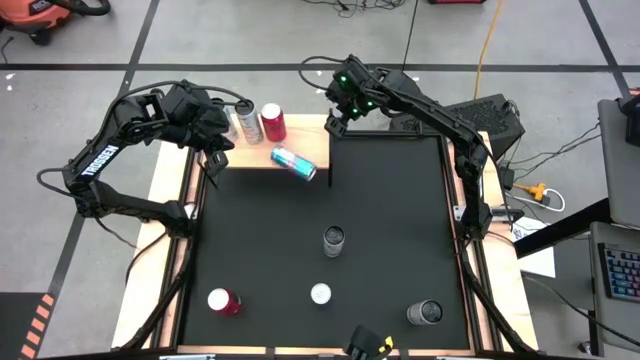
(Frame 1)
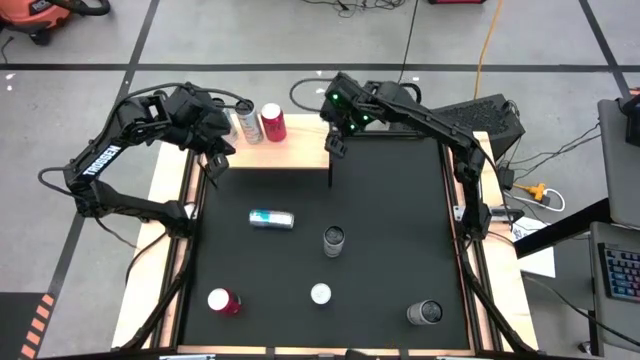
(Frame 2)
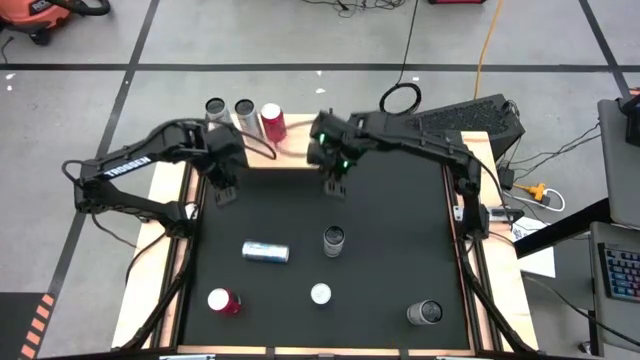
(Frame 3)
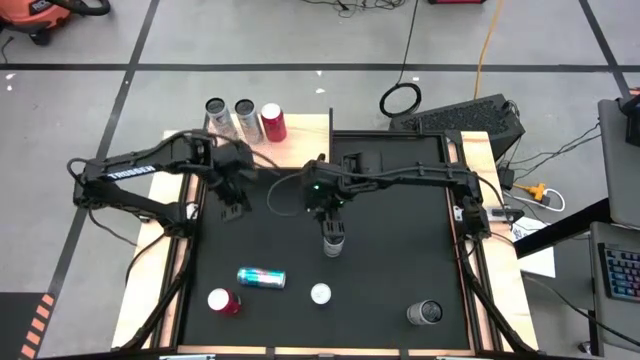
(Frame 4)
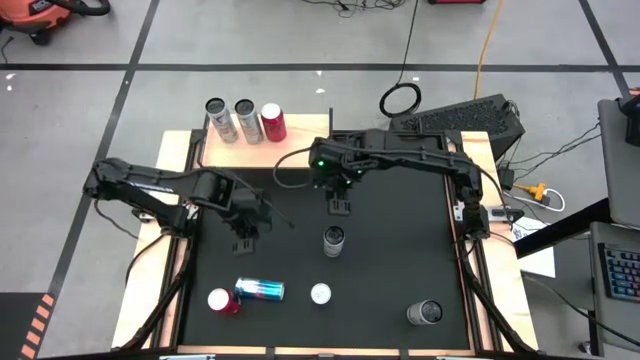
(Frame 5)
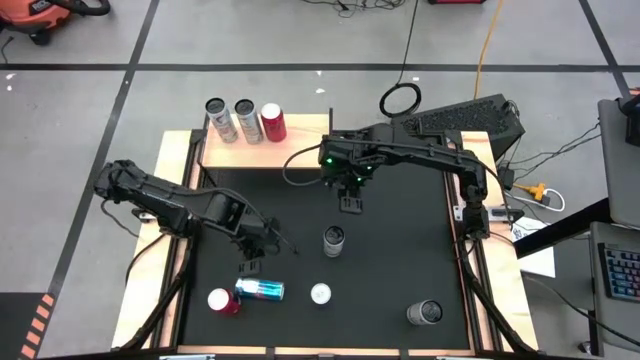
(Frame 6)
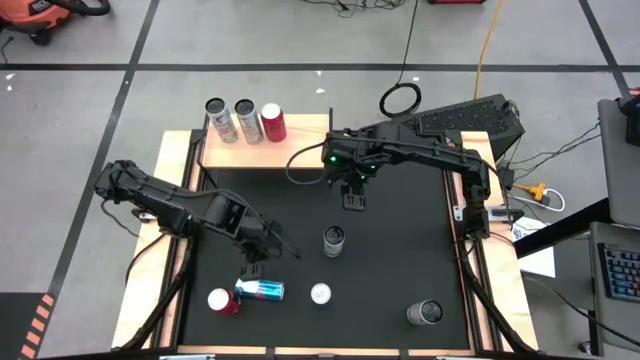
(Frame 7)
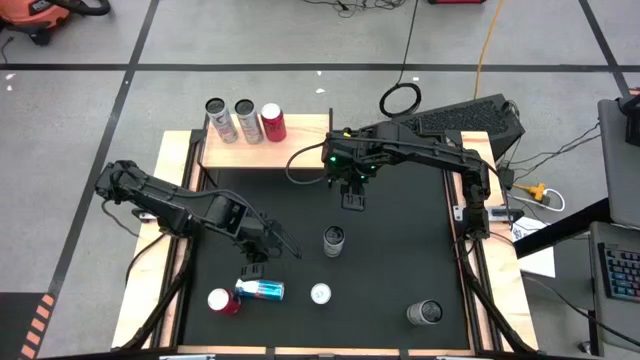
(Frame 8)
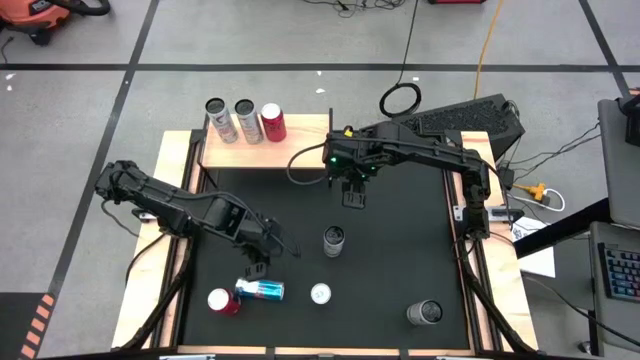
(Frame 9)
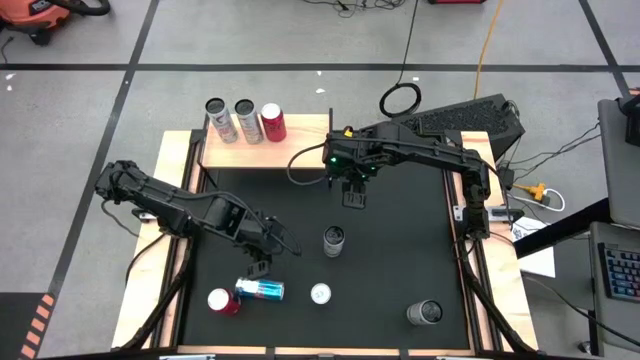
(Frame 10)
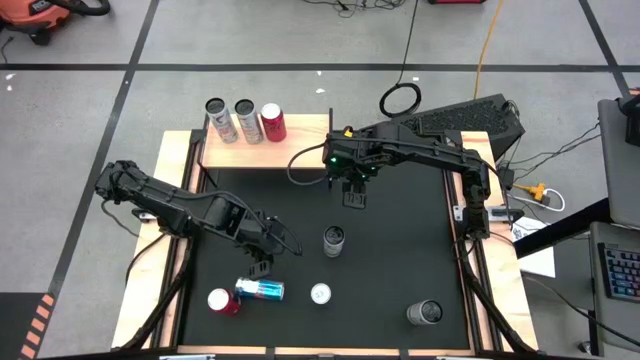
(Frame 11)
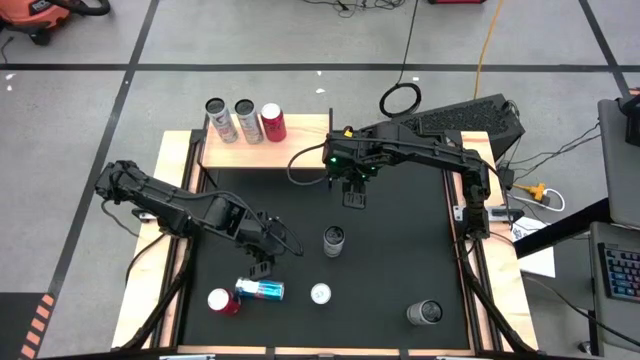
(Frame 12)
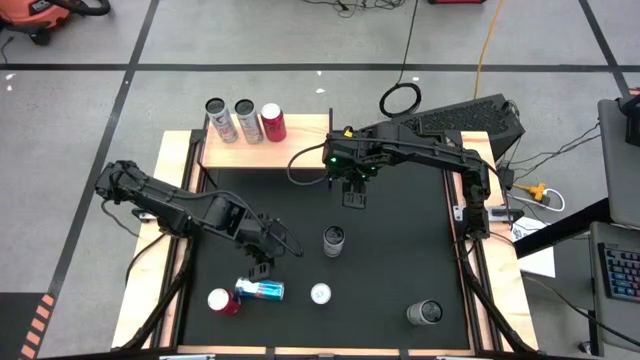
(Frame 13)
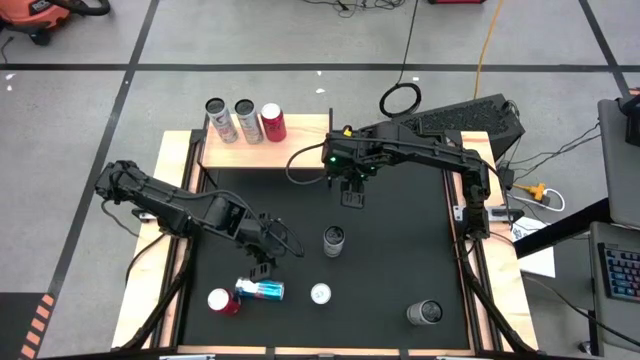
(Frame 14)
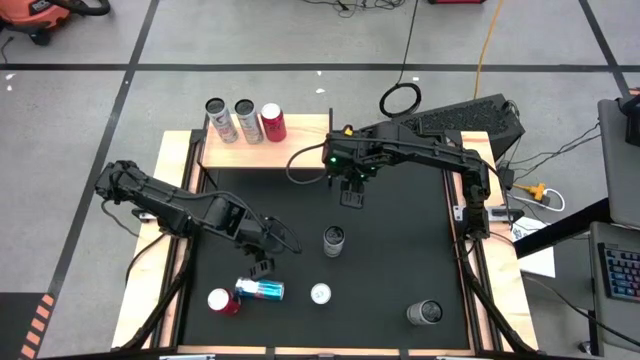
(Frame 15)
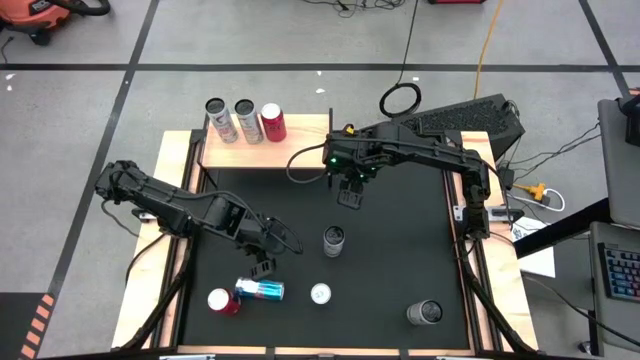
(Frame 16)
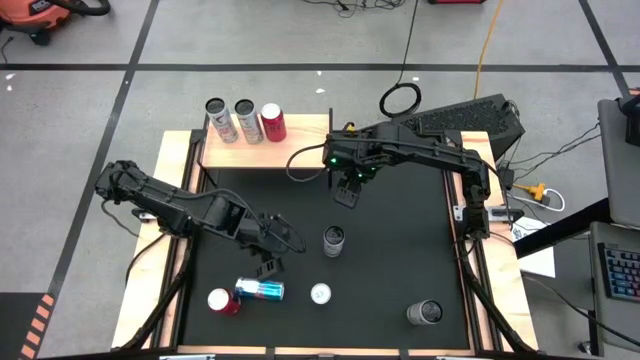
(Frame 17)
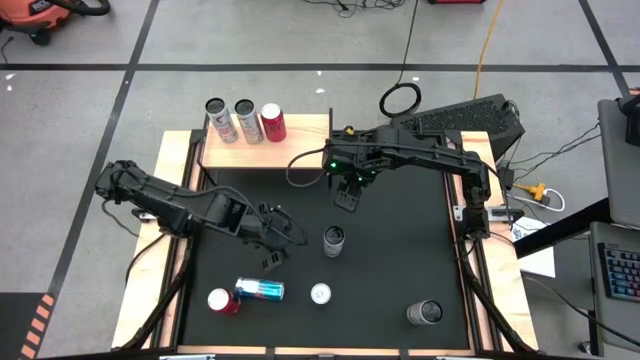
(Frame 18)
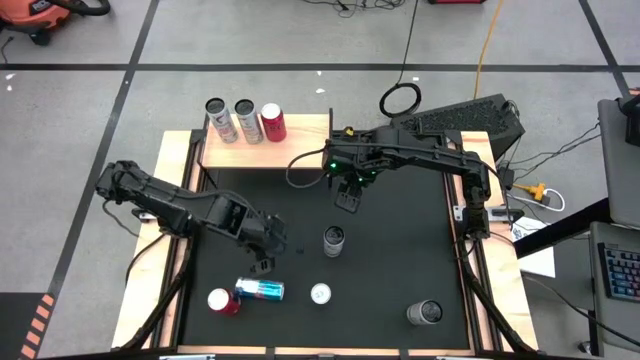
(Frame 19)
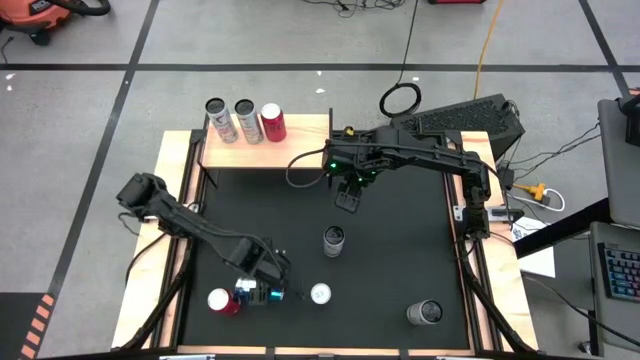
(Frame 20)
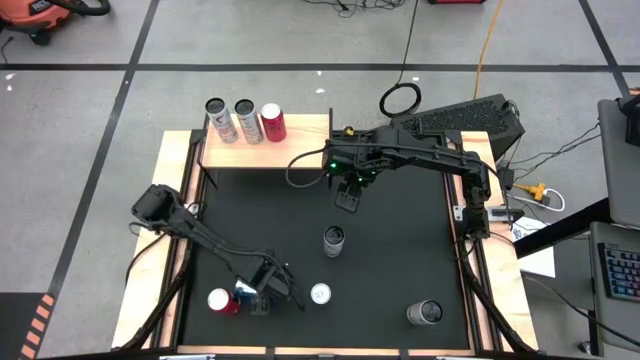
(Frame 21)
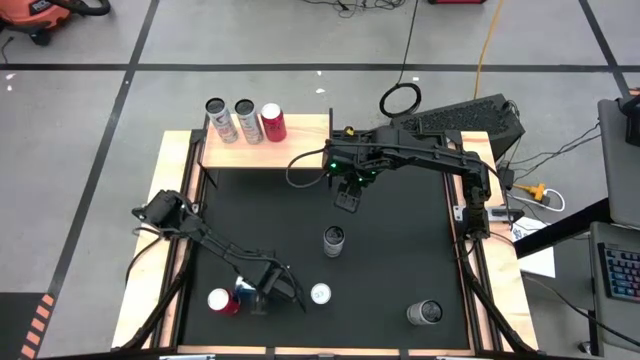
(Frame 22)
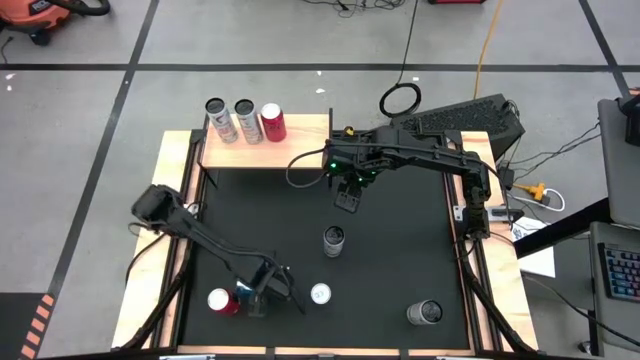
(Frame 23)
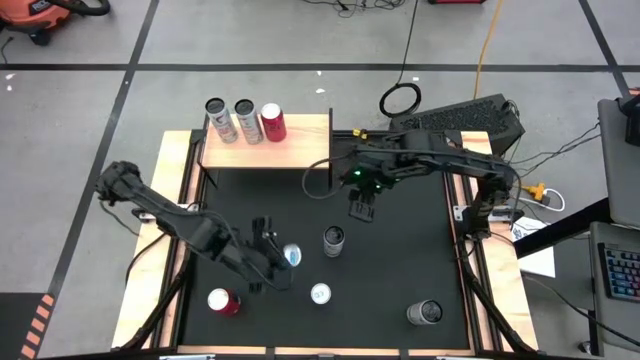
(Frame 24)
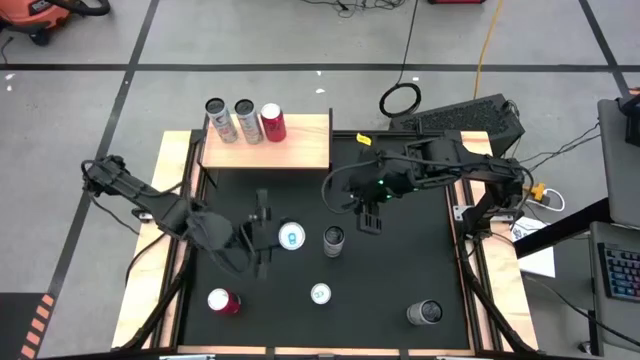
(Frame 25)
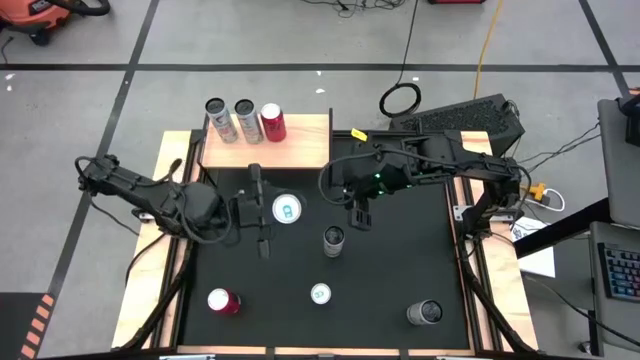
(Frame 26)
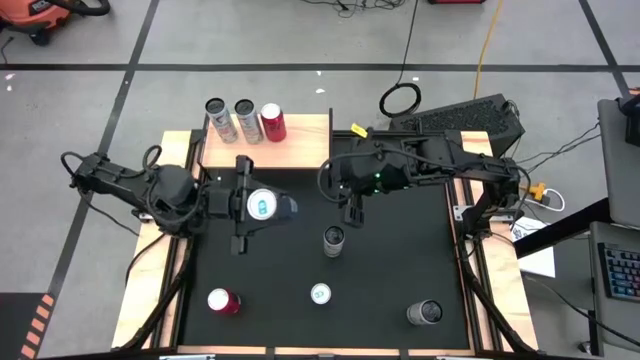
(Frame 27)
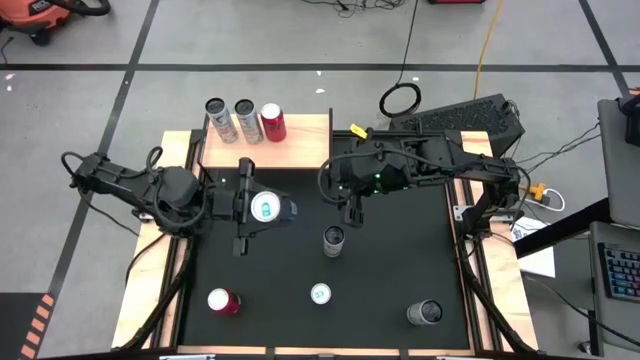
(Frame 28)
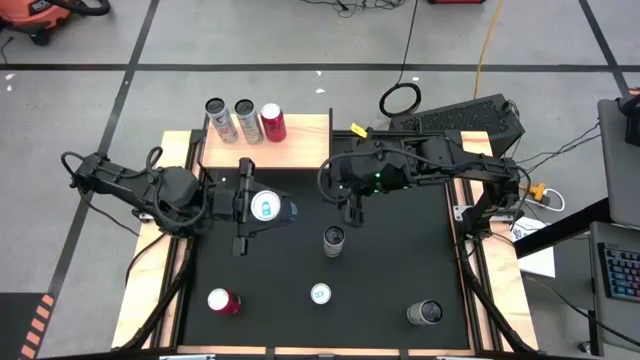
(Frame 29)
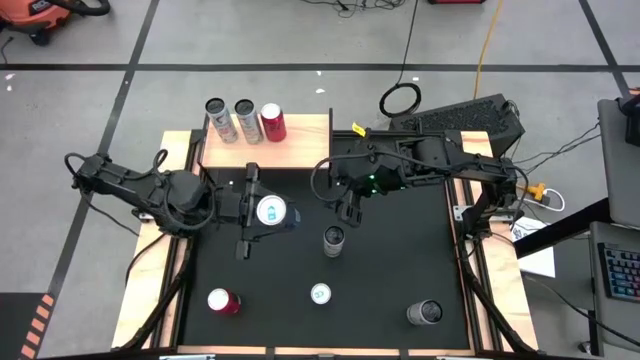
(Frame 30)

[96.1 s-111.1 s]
Task: Place canned beverage on shelf
Put the top blue soda can on the shelf

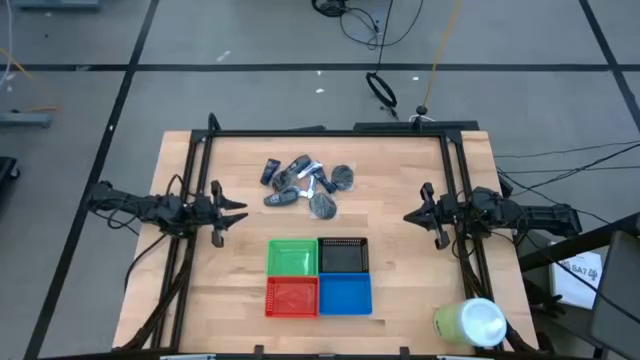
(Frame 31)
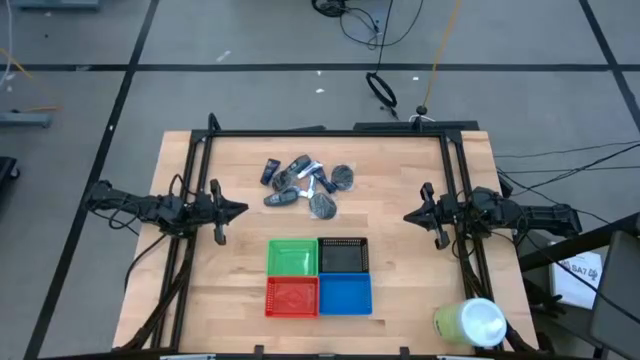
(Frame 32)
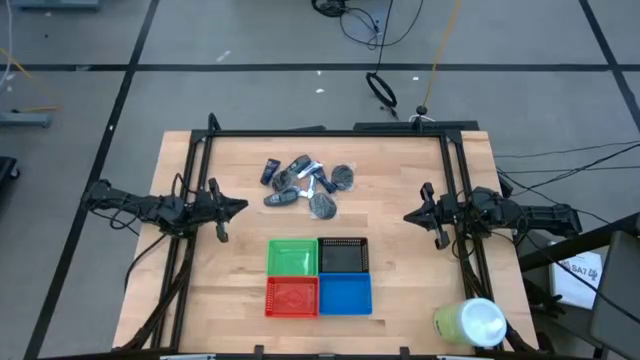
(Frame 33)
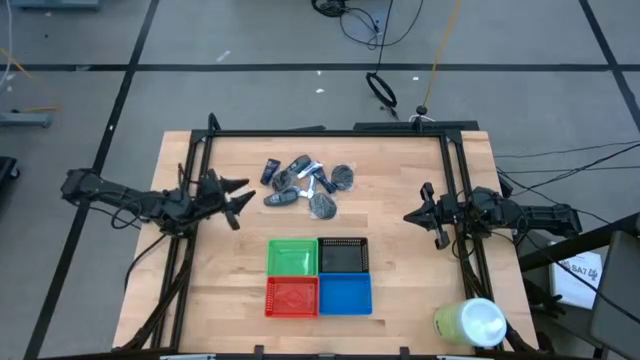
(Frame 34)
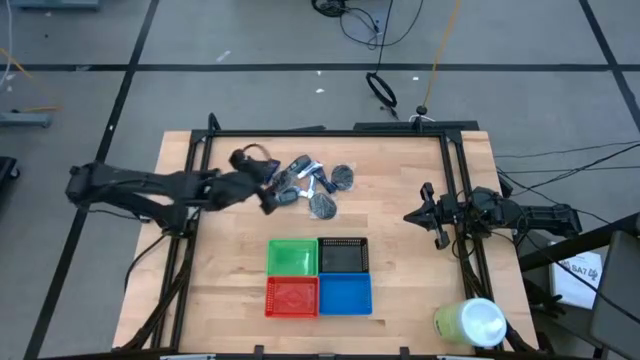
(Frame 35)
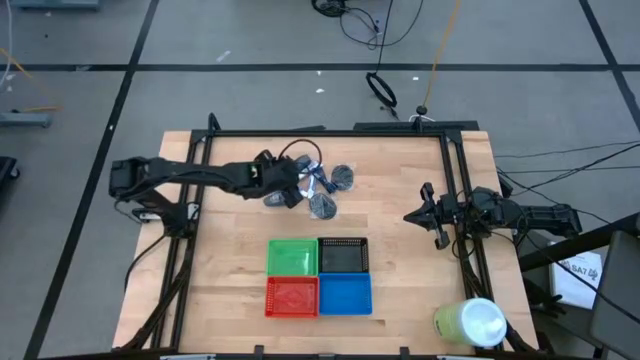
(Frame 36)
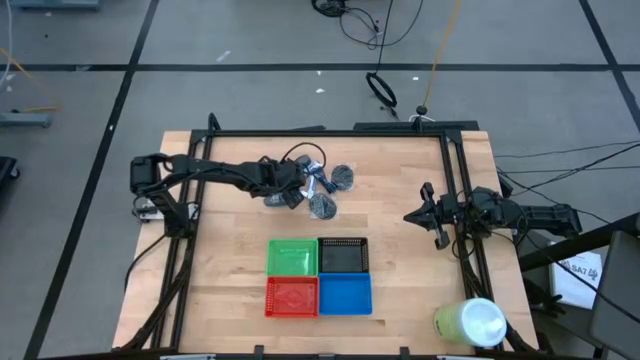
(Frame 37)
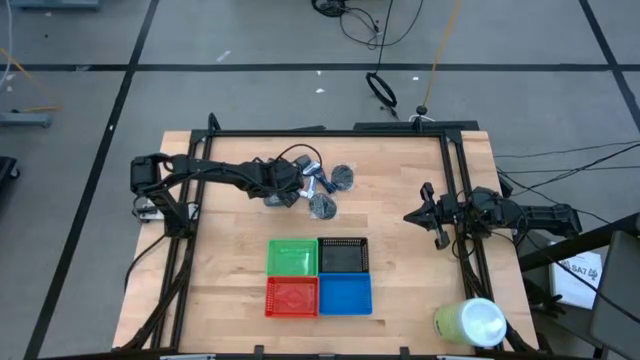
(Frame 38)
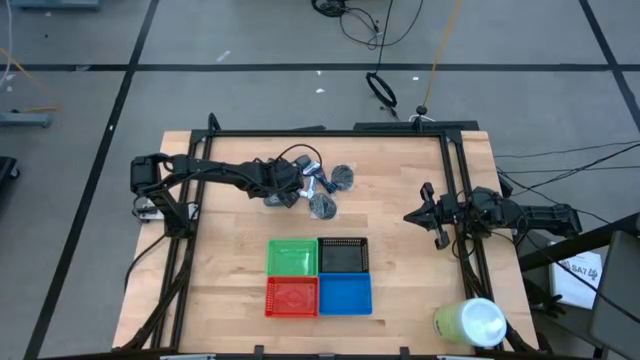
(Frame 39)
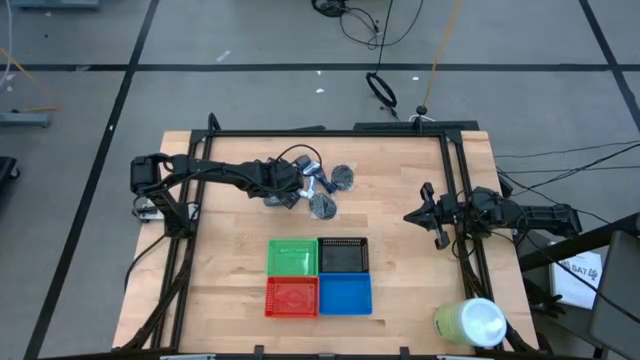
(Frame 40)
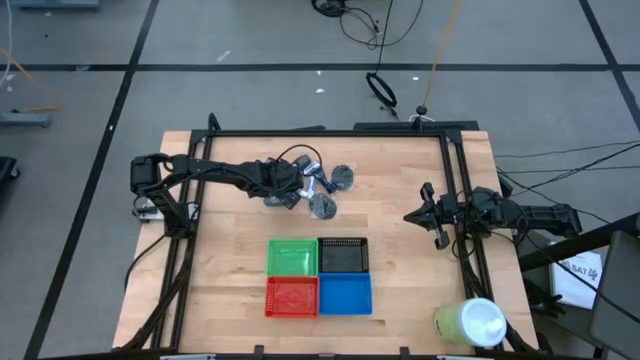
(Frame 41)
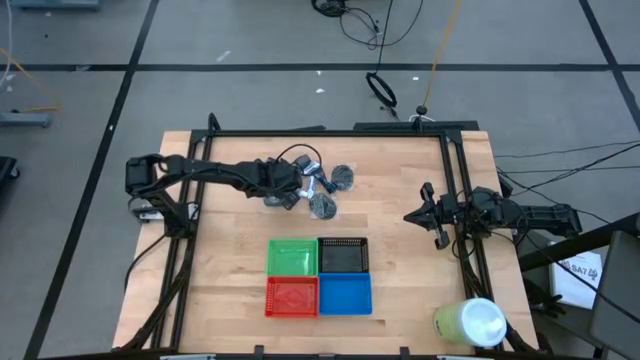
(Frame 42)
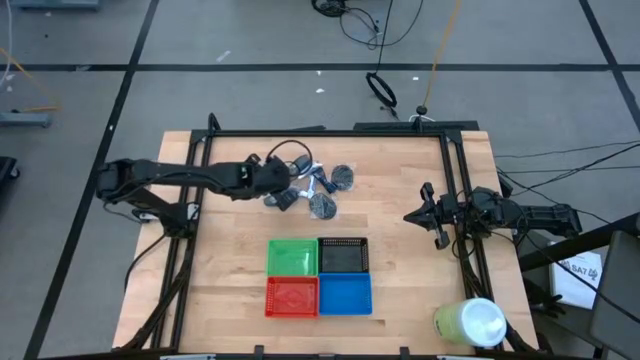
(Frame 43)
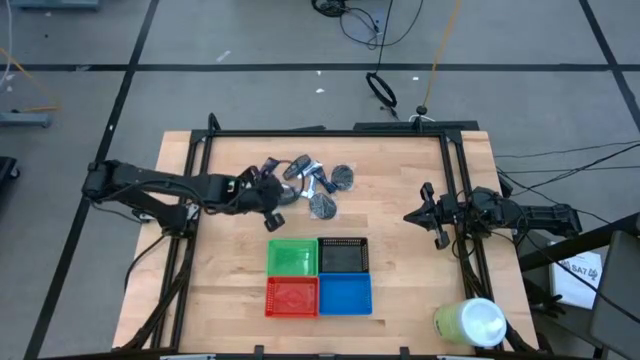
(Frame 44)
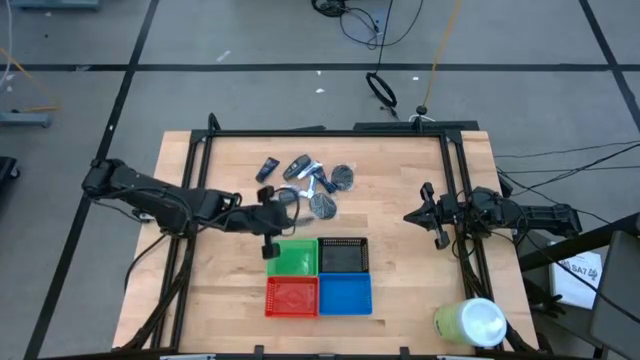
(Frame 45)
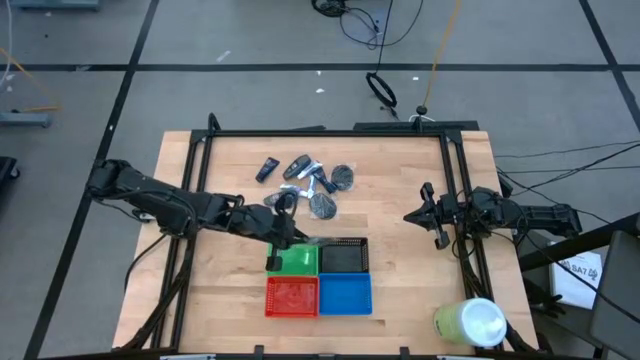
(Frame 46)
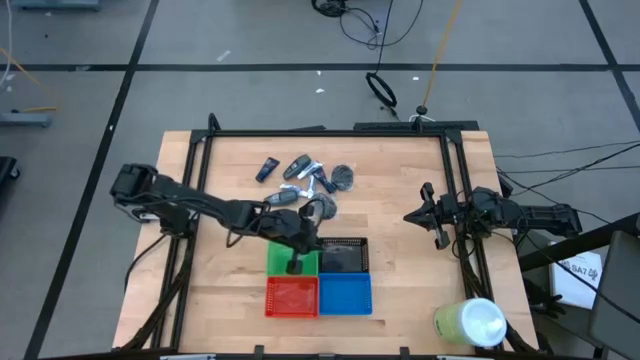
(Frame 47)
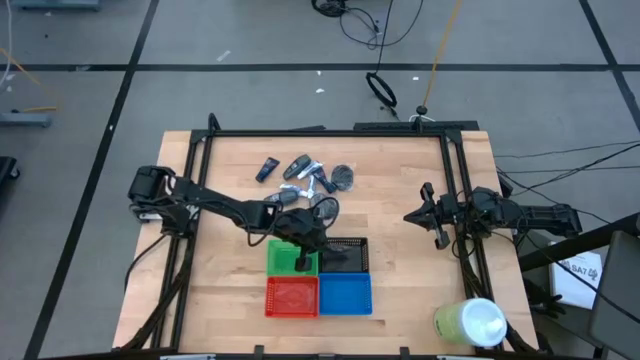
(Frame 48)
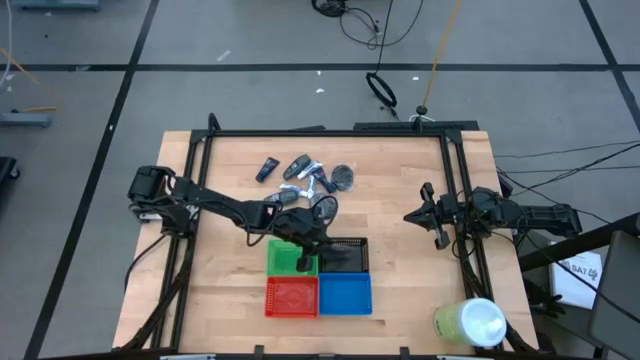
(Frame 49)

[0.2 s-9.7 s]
Task: Pick & Place Travel size toiletries
Put the top left black hairbrush into the black bin
